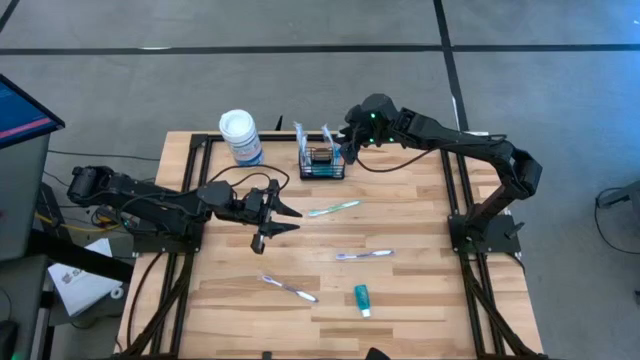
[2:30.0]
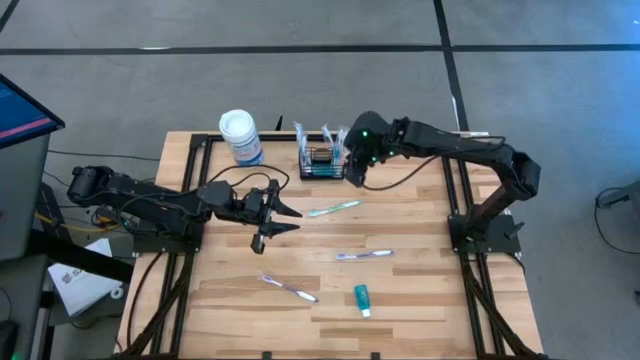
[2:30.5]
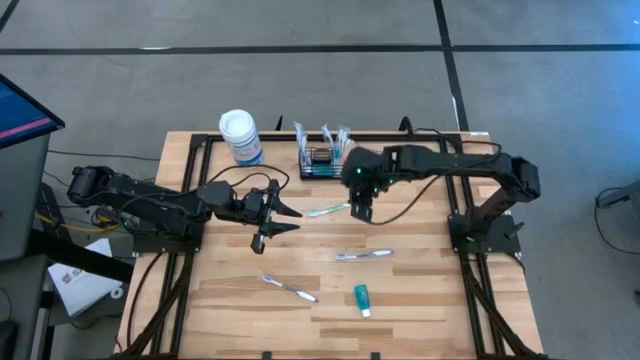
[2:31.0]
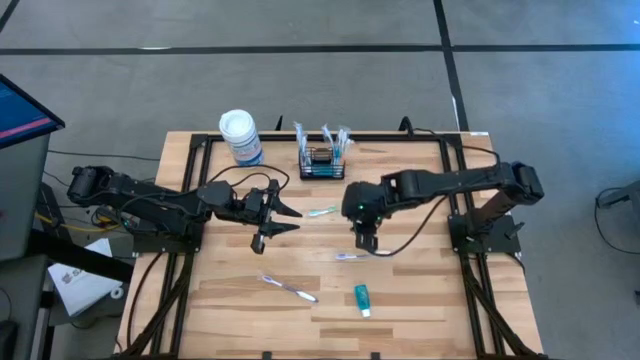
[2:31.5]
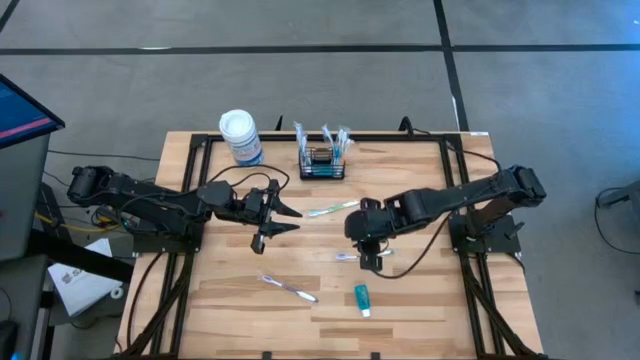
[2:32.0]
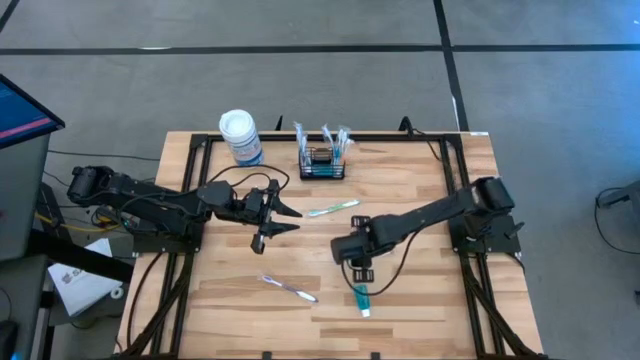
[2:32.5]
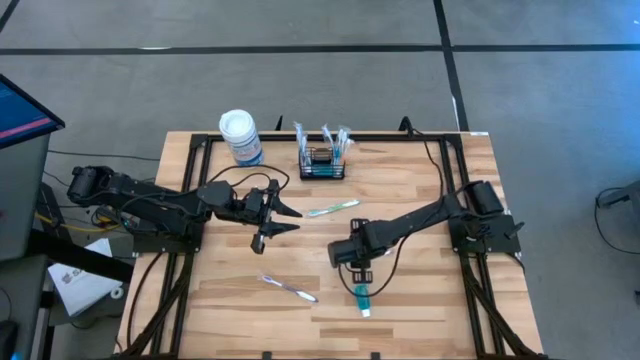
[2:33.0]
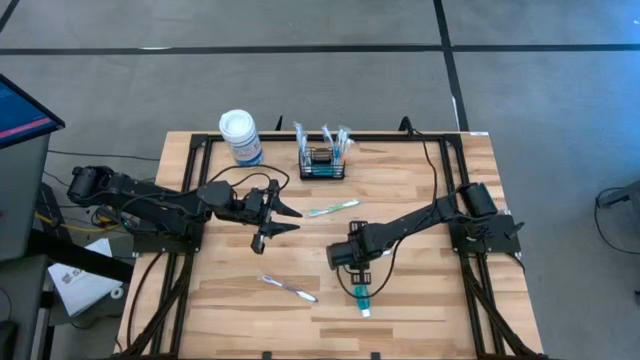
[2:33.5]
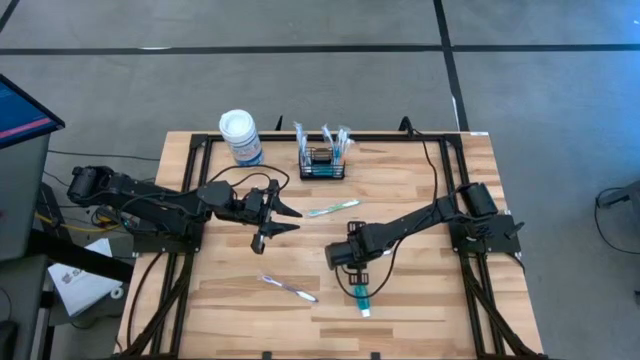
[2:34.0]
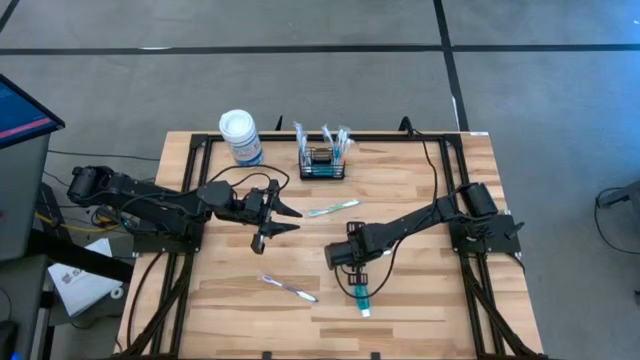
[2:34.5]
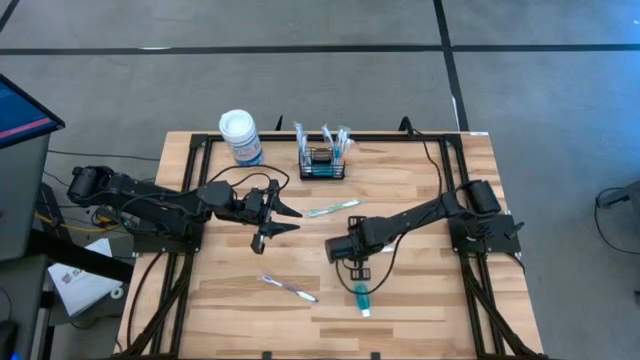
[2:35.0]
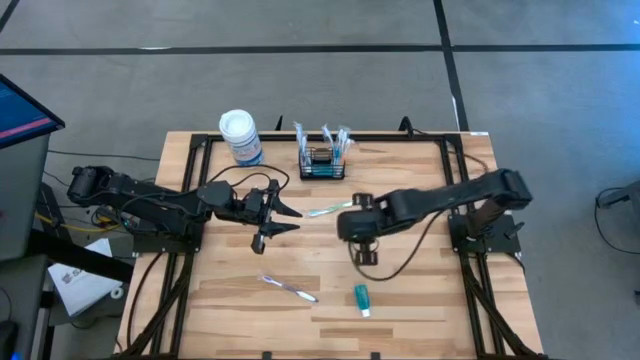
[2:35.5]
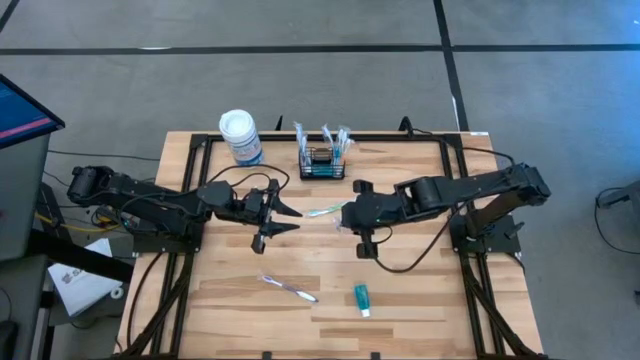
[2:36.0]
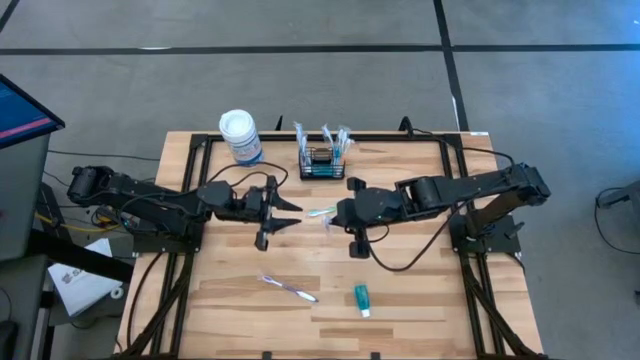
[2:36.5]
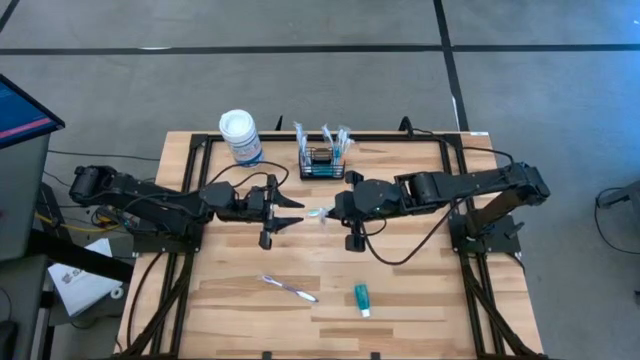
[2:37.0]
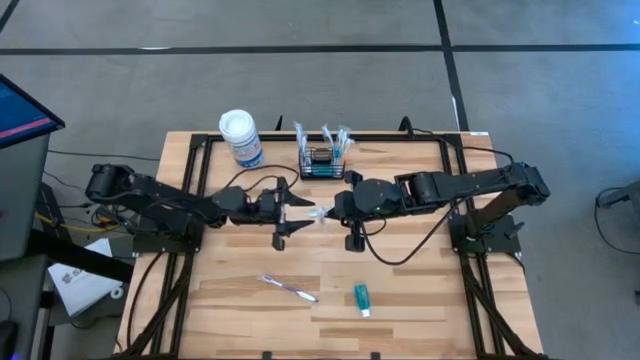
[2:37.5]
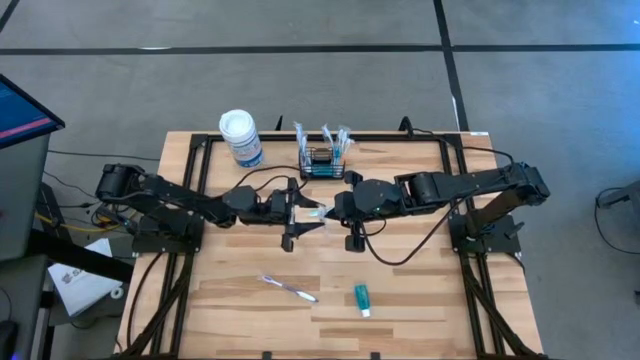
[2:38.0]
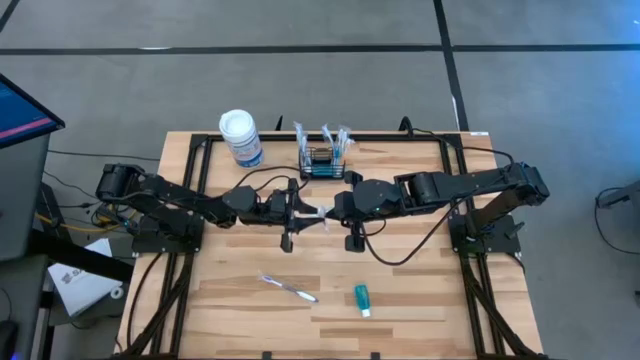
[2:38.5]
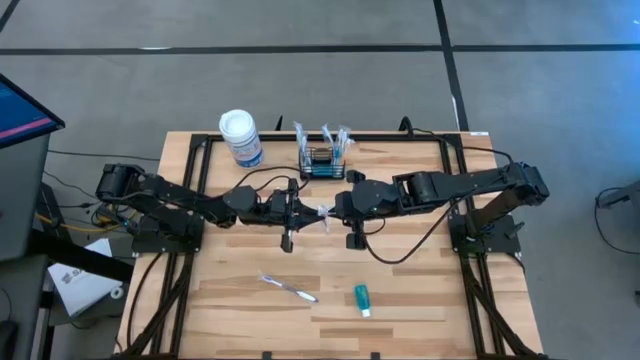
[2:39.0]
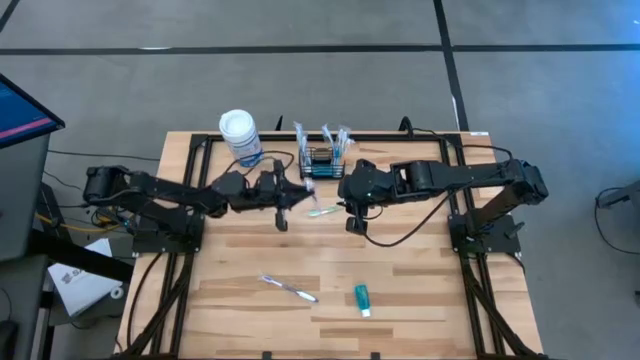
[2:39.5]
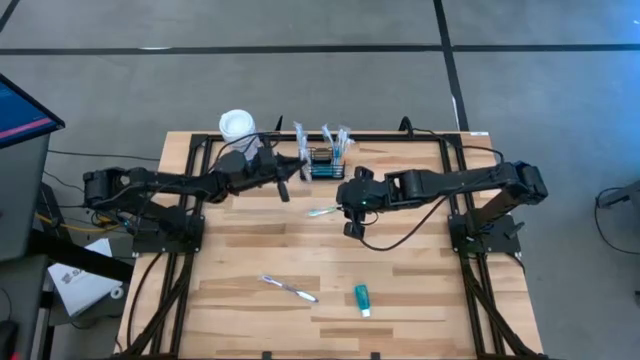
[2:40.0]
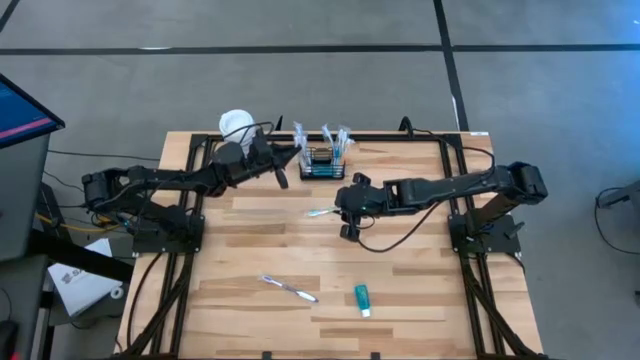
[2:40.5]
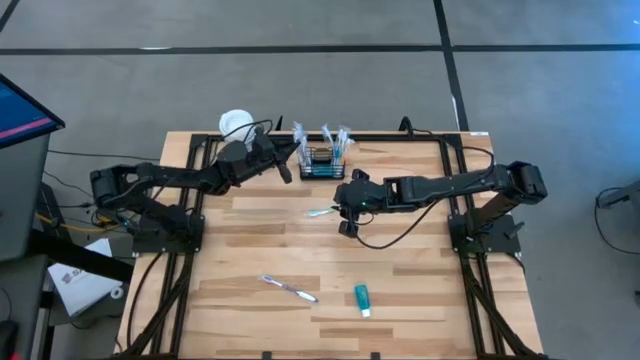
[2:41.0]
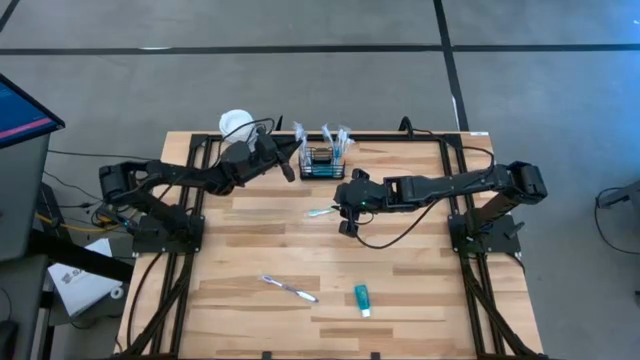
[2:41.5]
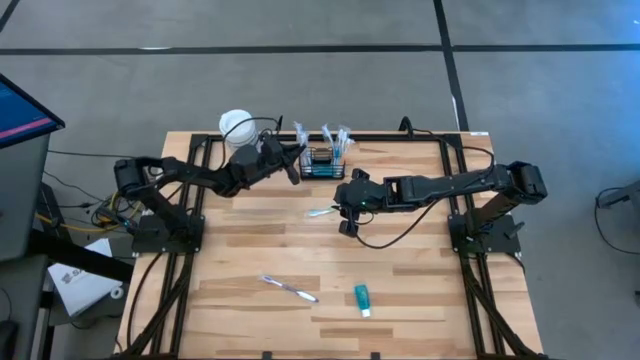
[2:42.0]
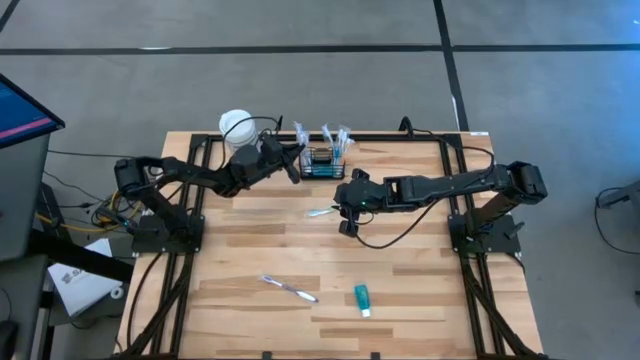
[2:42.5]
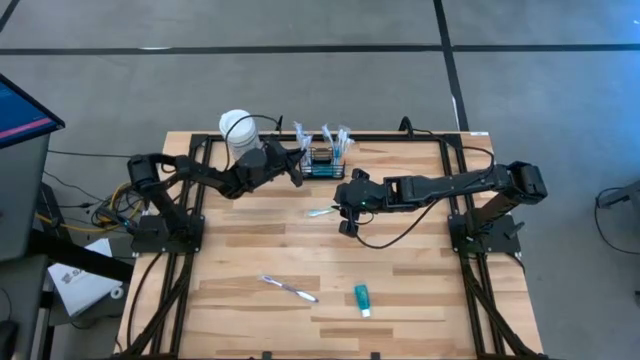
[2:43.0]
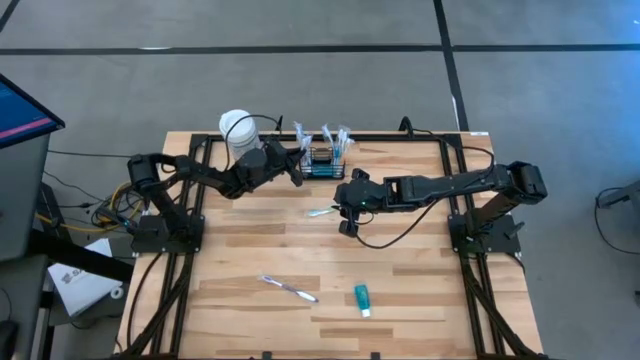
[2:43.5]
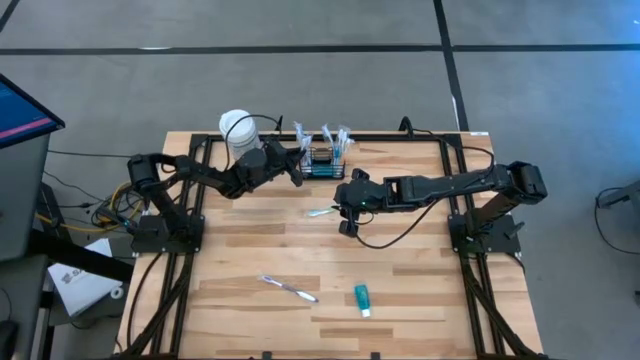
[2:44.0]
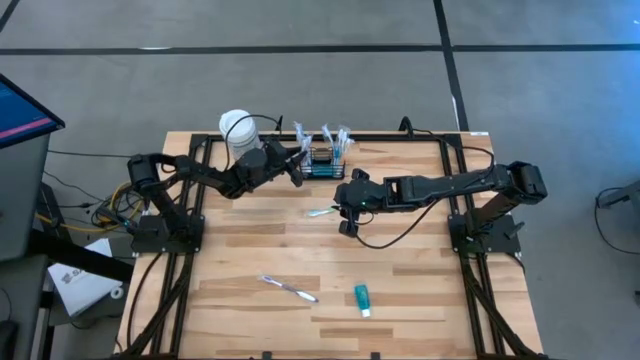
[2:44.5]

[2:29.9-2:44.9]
Task: Pick & Place toothbrushing station
Put the right purple toothbrush into the black wire organizer

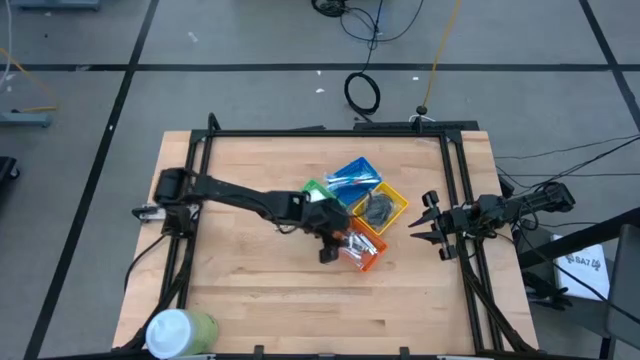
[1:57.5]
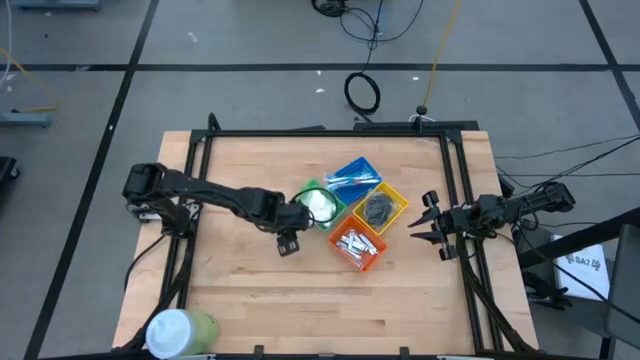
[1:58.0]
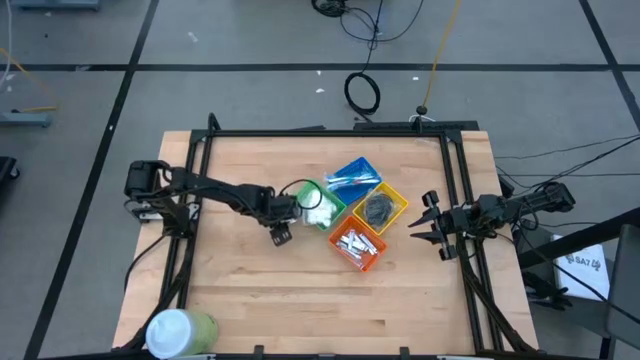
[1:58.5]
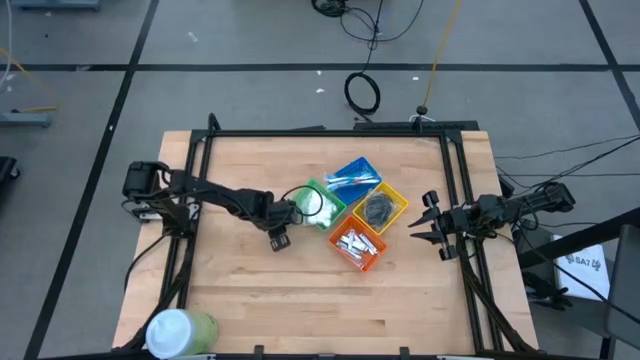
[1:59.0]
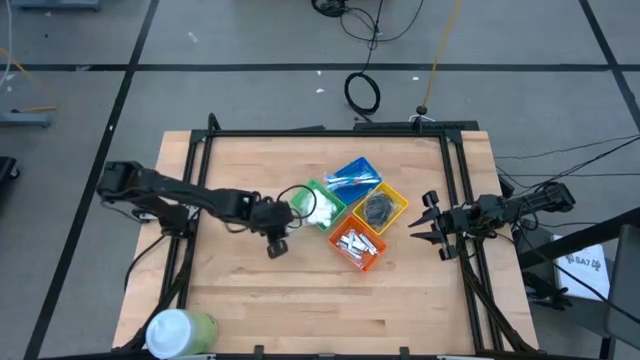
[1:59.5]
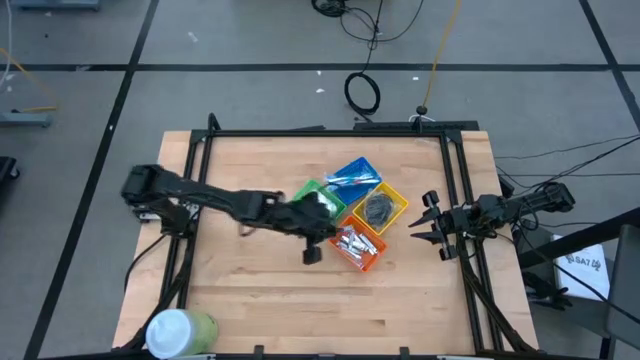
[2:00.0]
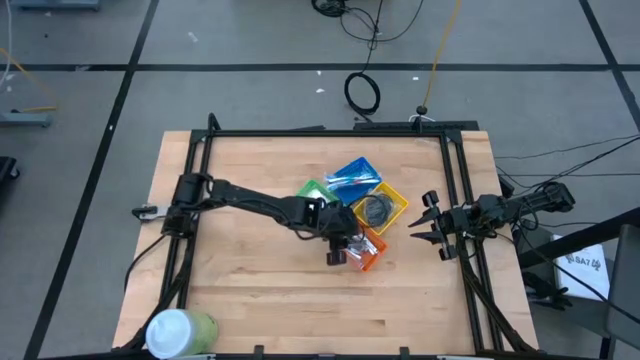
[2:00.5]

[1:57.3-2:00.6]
Task: Pick & Place Travel size toiletries
Put the silver nail cutter into the orange bin

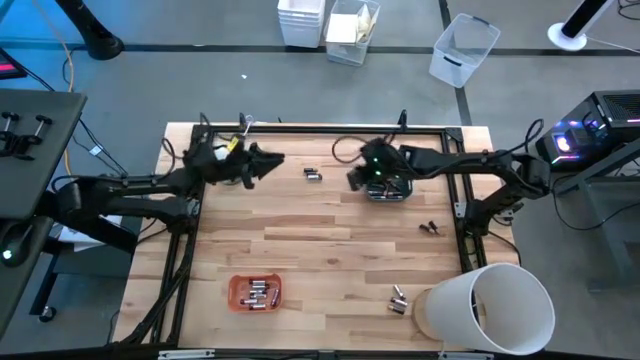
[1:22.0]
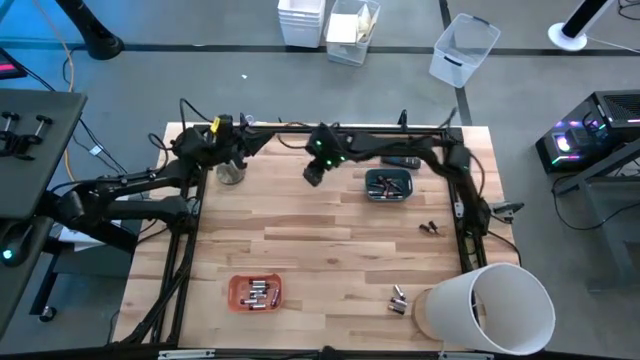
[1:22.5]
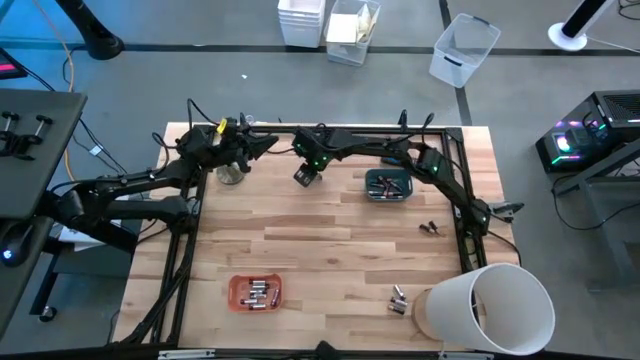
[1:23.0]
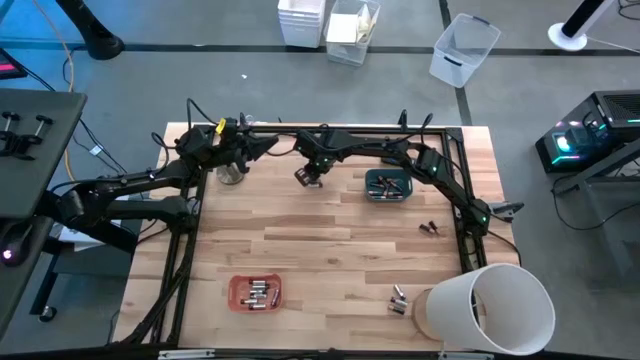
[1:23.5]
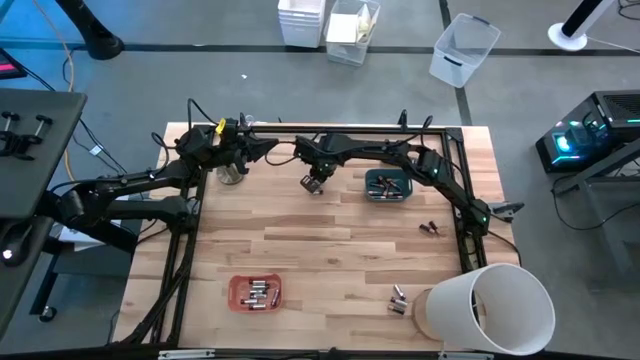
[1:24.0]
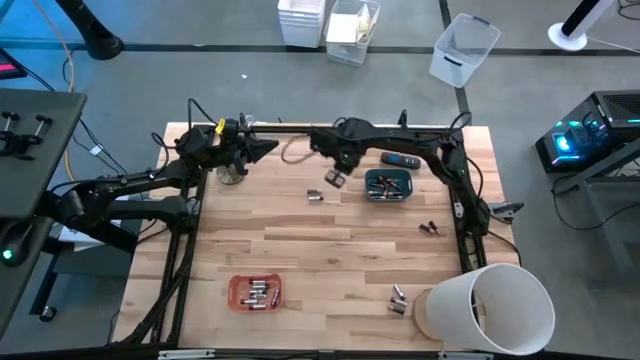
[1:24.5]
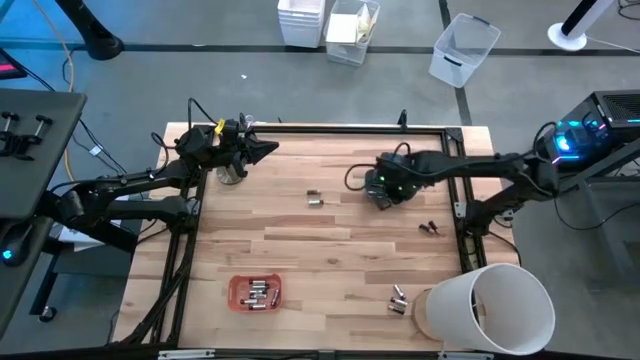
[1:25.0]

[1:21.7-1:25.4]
Task: Sort batteries
Put the black battery into the blue bin

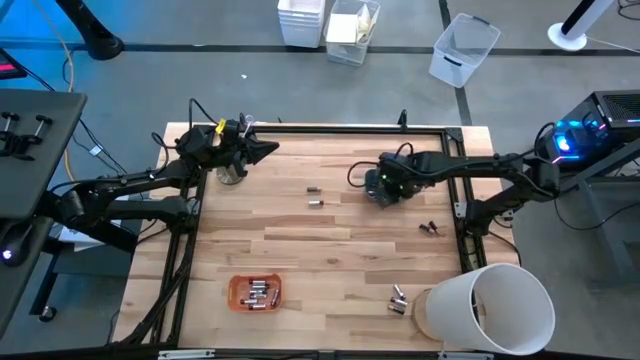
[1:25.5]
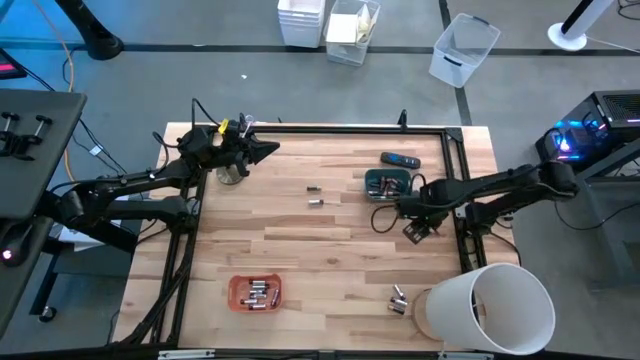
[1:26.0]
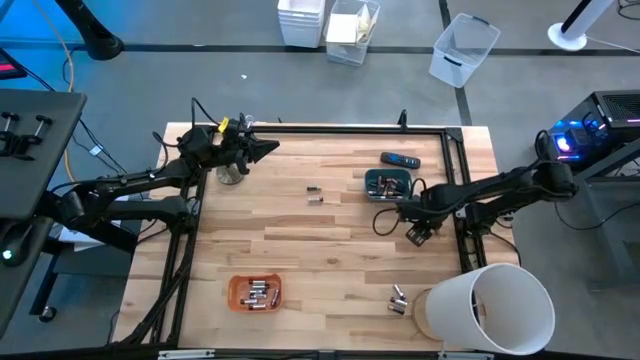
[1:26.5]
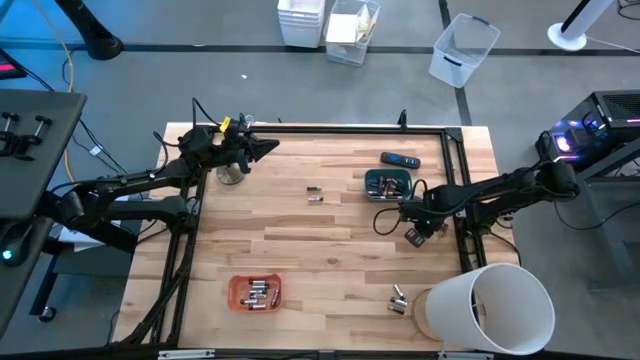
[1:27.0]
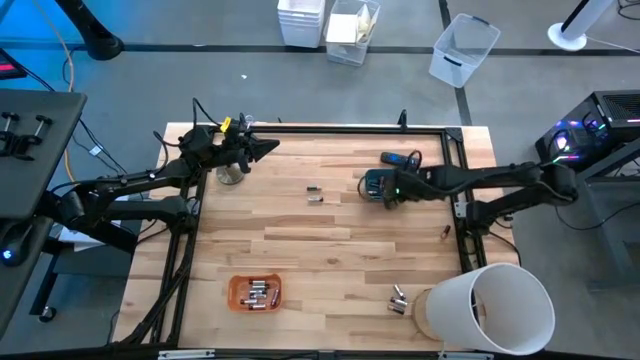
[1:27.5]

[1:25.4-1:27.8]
Put the black battery into the blue bin
